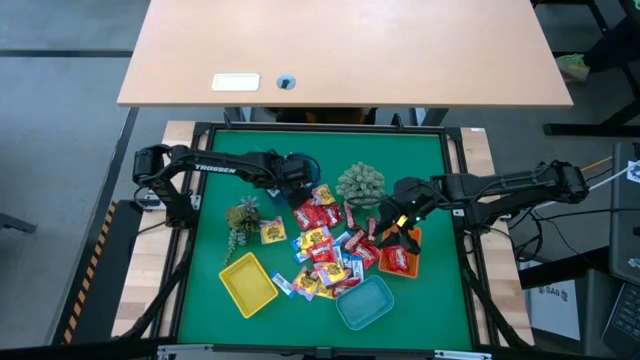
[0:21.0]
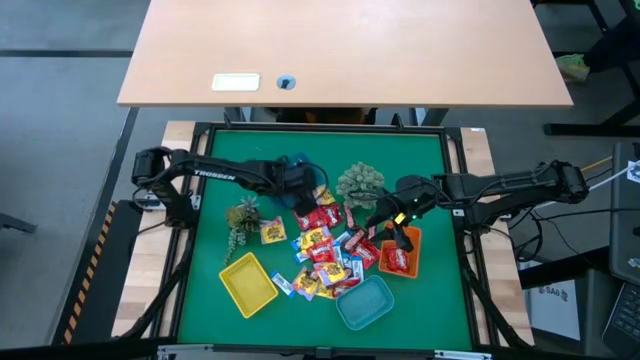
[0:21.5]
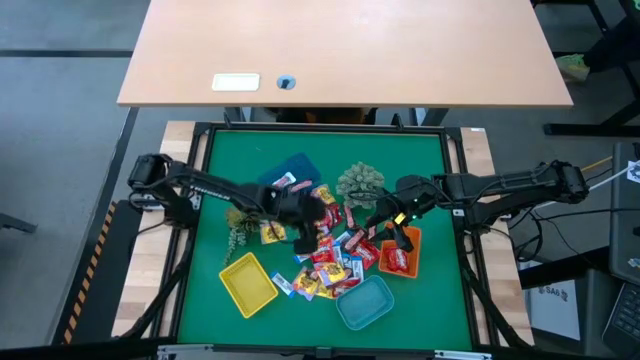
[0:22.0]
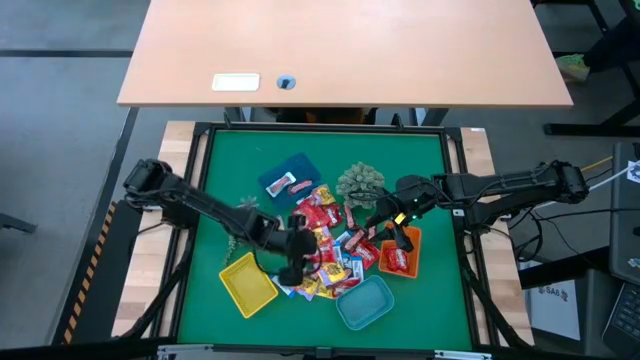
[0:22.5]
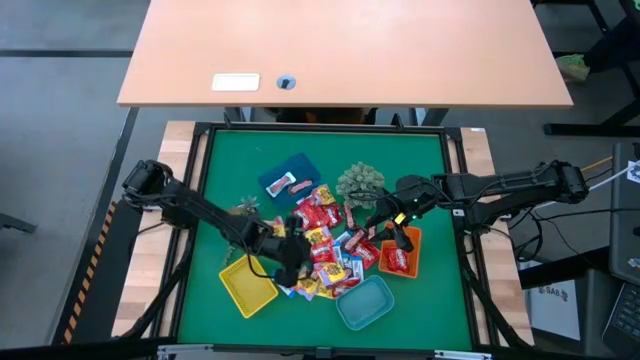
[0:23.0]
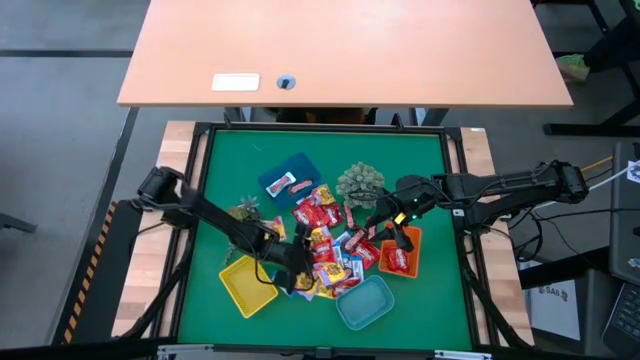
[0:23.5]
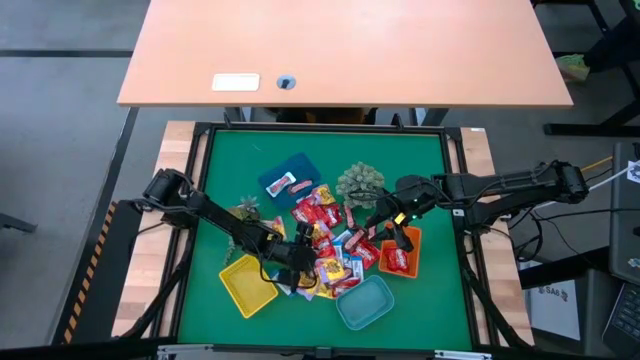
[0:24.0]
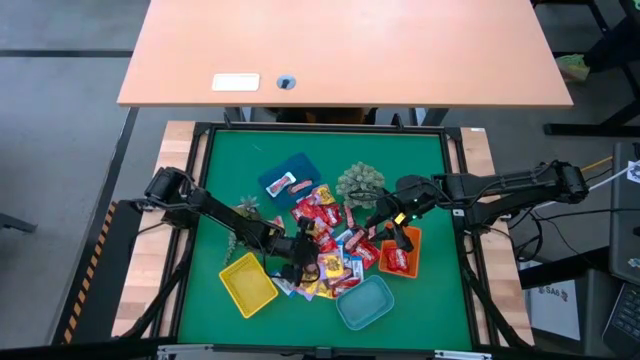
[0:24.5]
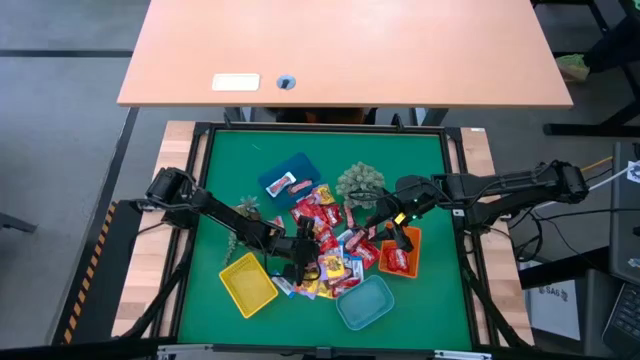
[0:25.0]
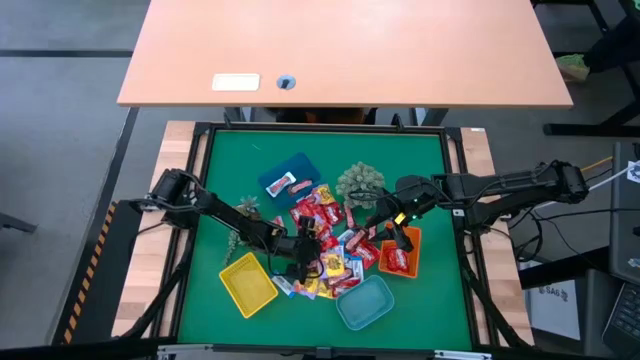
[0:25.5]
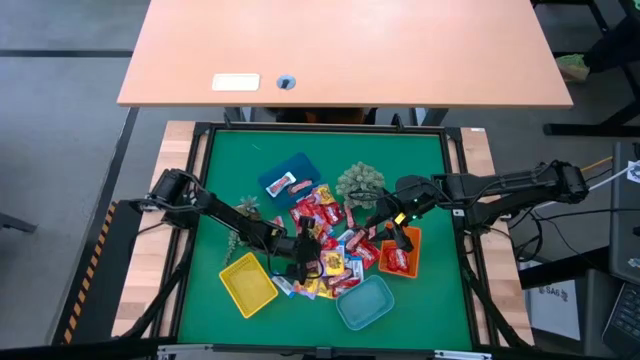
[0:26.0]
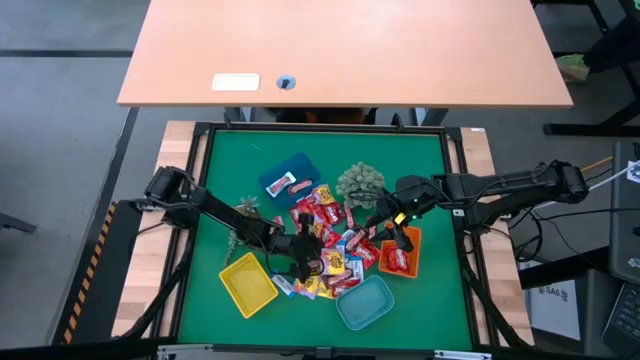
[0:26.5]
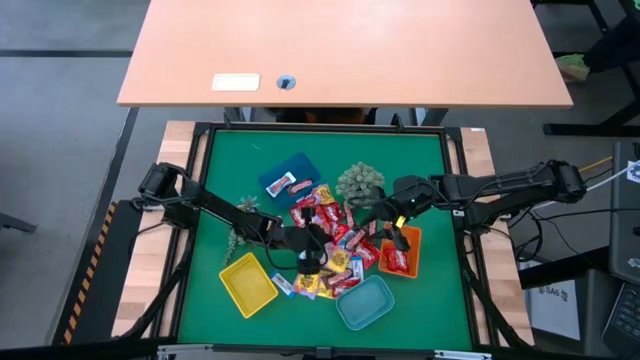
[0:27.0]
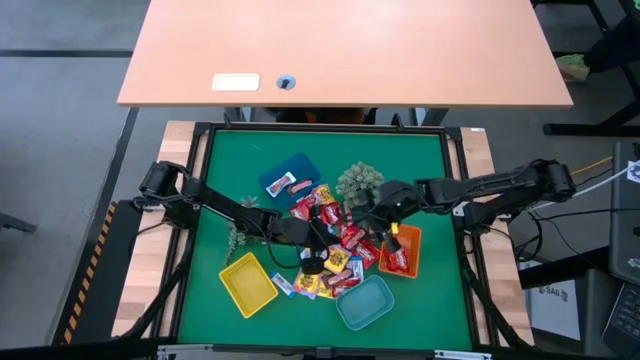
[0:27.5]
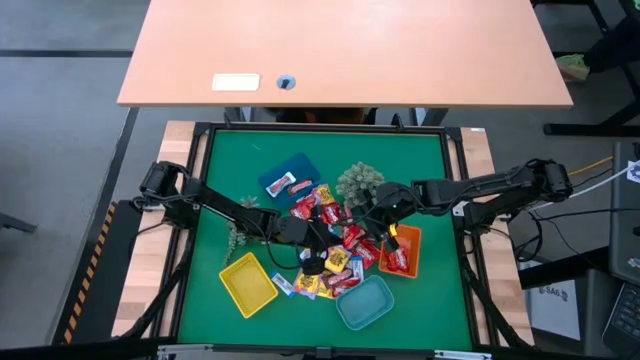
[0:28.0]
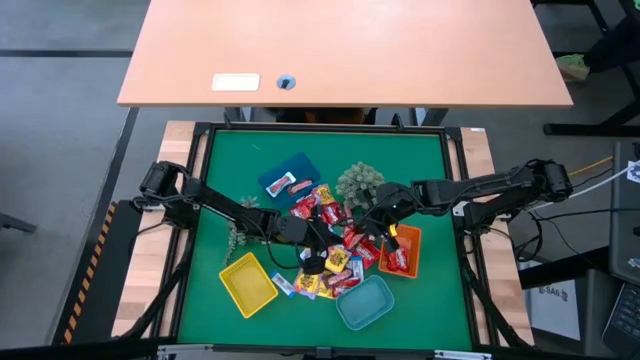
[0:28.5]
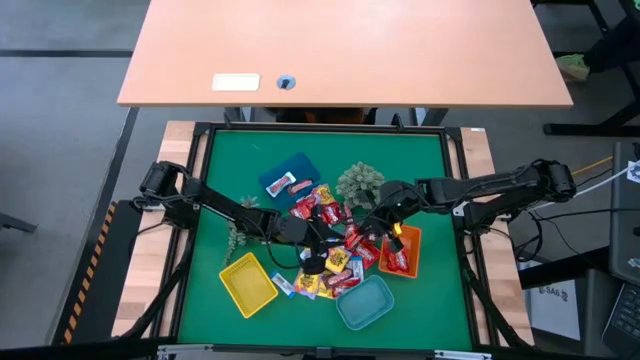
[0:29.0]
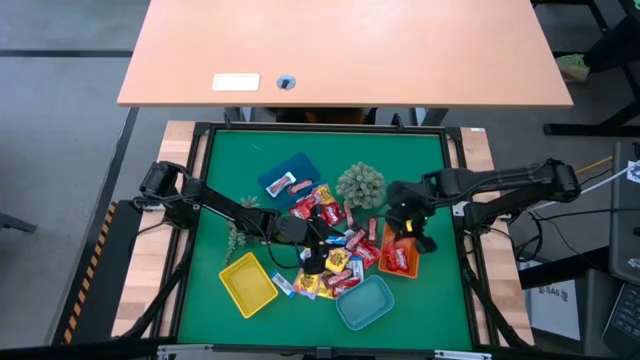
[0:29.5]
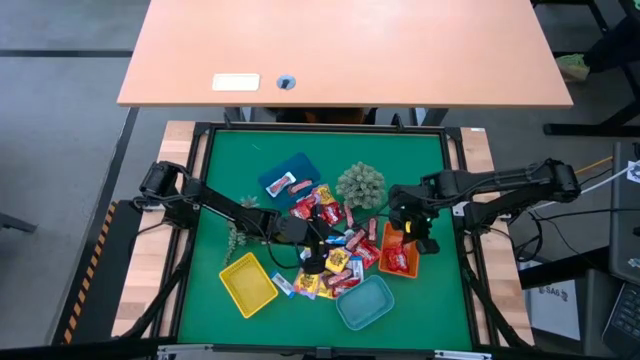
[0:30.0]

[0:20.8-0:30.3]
Task: Sort candy
Put the red candy into the orange bin

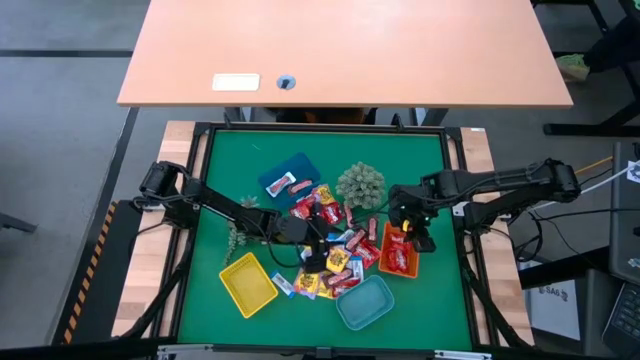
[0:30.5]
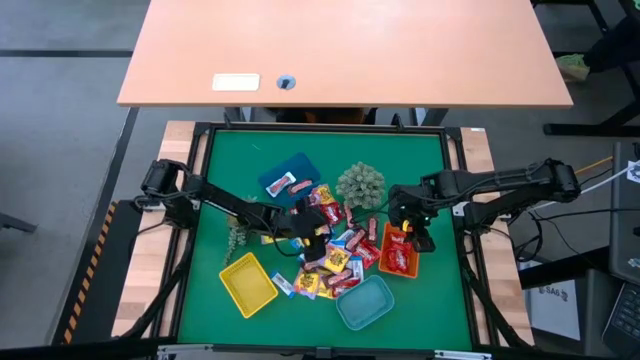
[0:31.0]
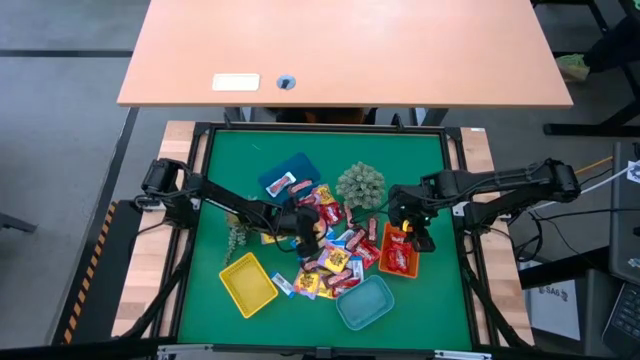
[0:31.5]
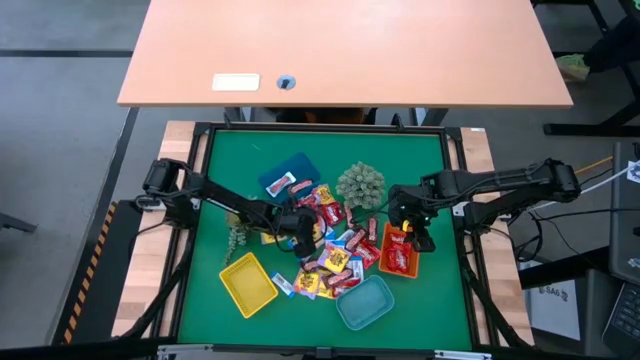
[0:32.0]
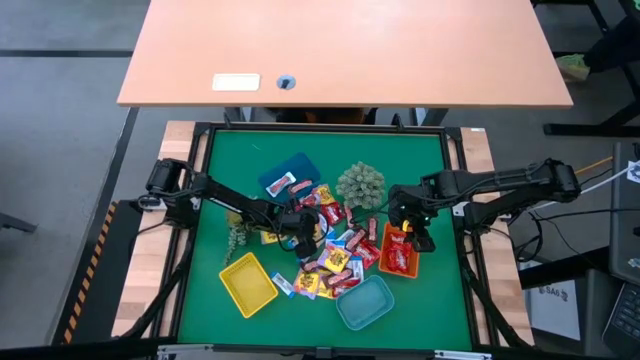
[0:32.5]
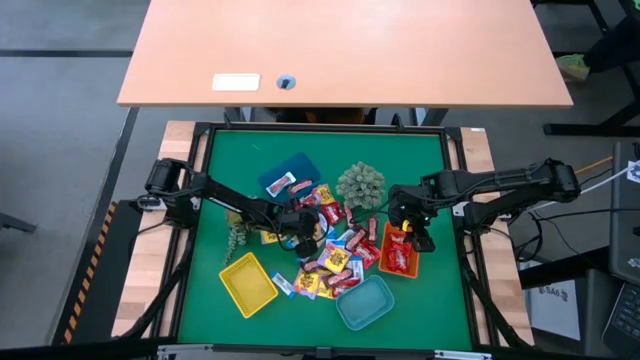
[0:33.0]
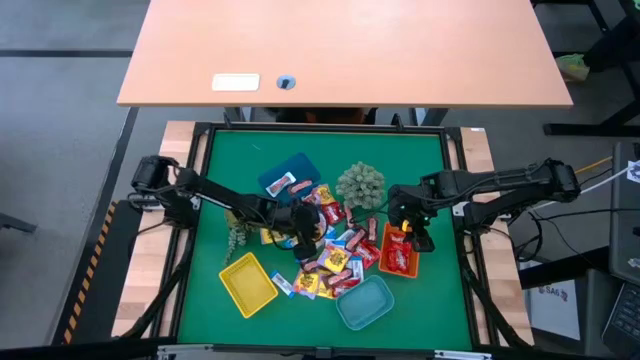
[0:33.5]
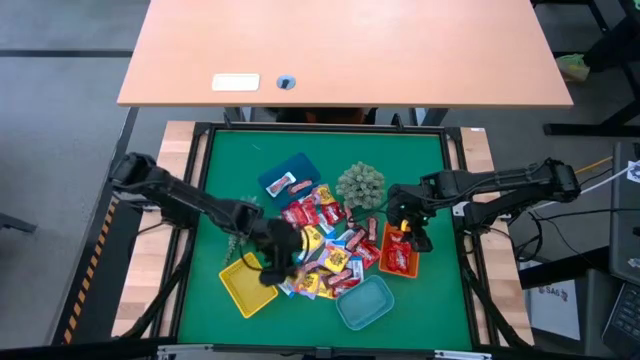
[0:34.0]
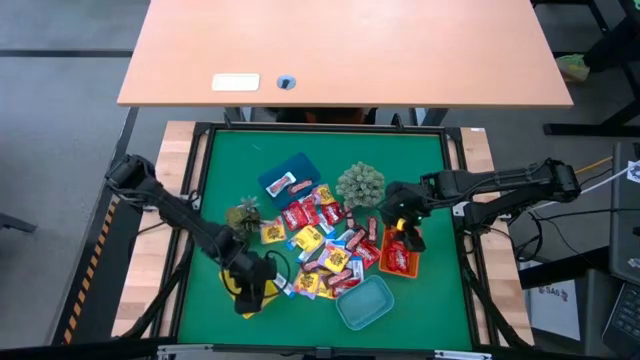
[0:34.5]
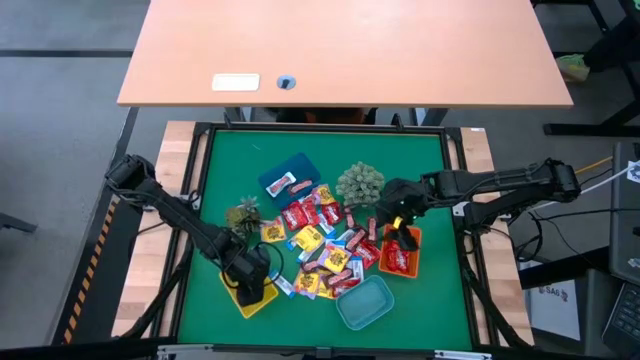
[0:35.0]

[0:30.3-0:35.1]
Put the yellow candy into the yellow bin

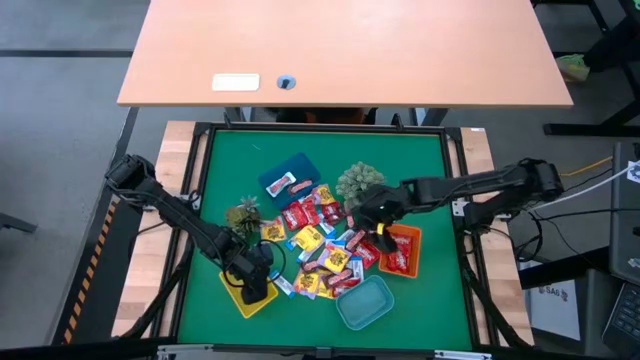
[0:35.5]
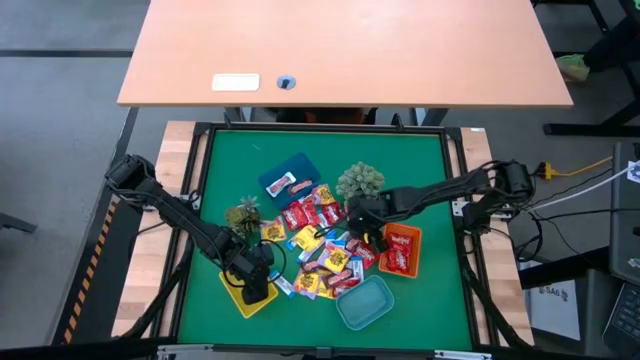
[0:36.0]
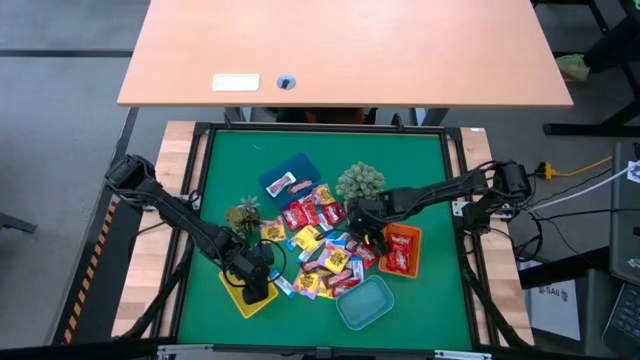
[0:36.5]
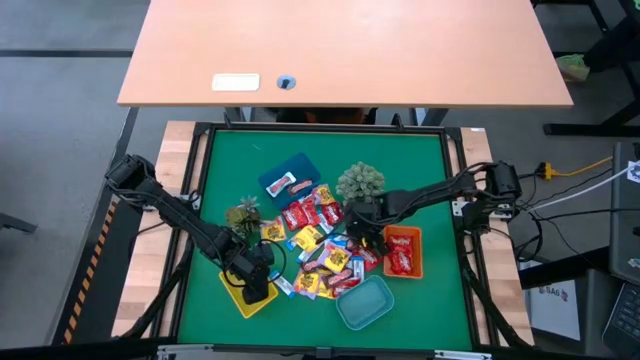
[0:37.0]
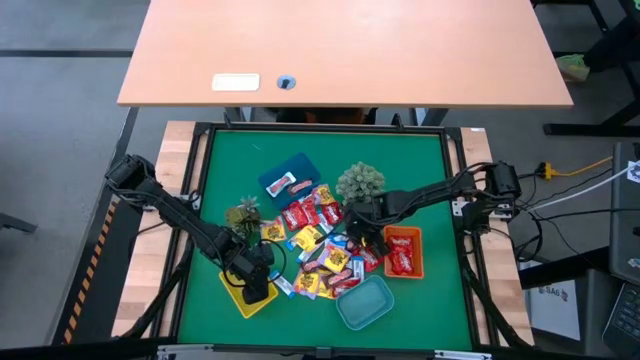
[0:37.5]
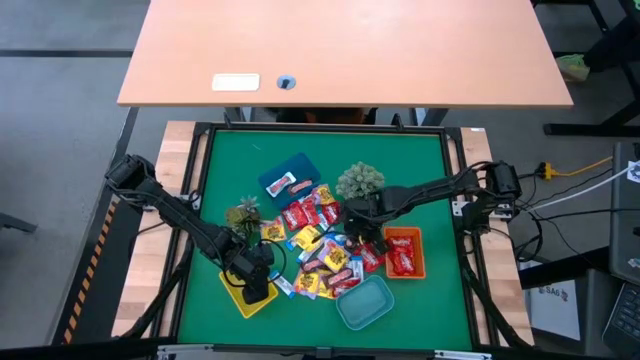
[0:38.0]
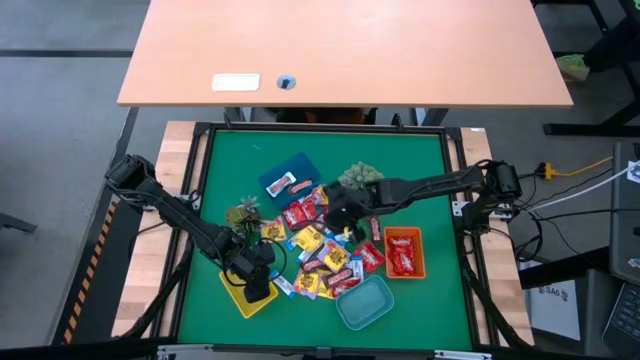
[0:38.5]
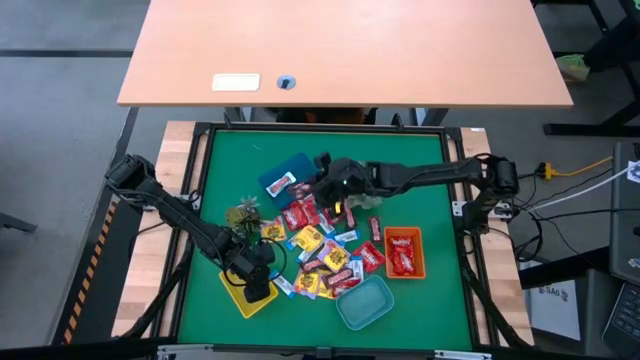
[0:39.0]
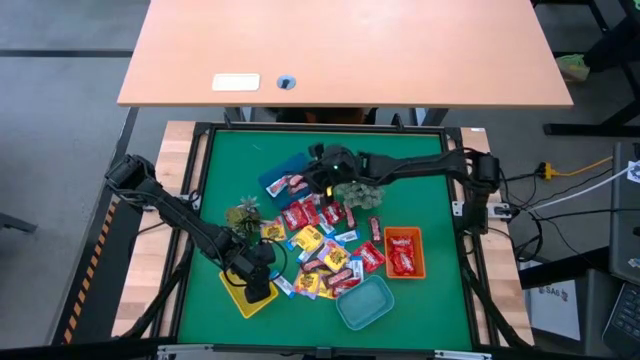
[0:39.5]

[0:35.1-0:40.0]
Put the brown chocolate into the blue bin

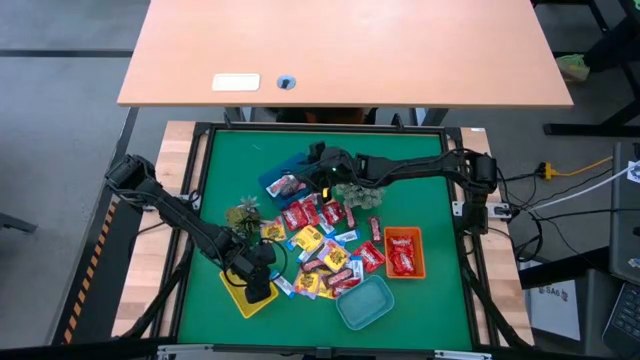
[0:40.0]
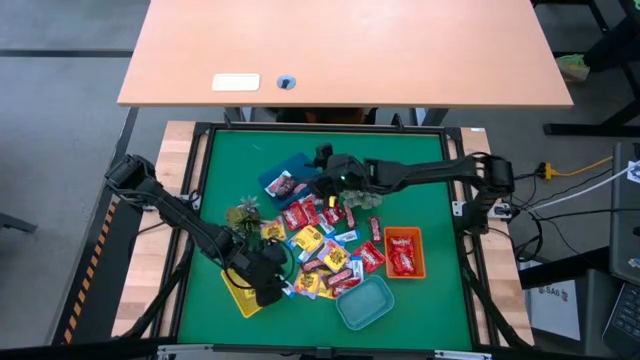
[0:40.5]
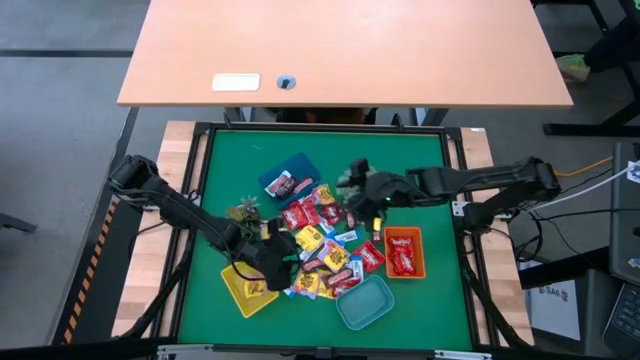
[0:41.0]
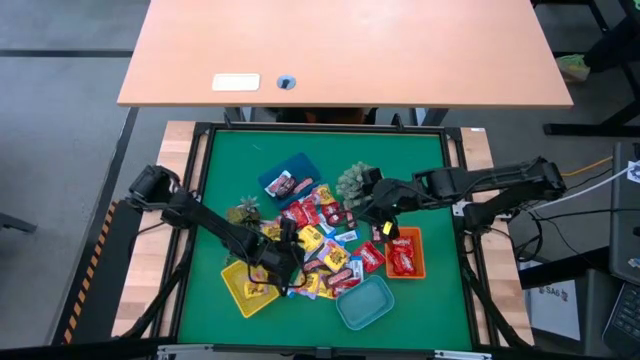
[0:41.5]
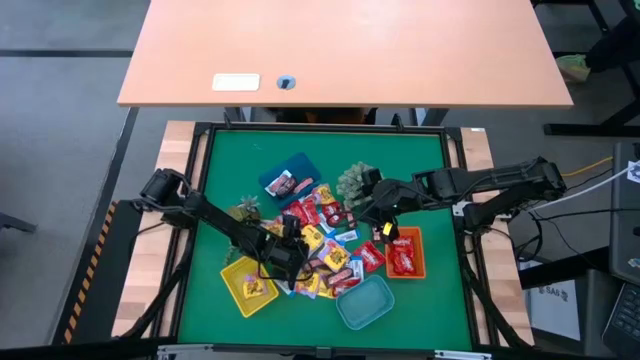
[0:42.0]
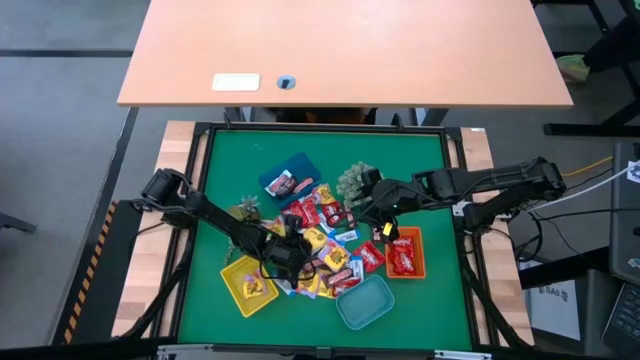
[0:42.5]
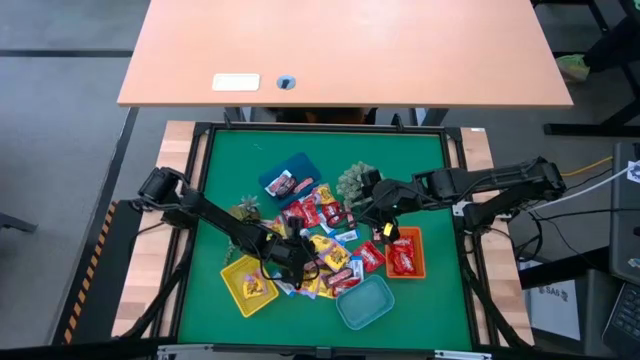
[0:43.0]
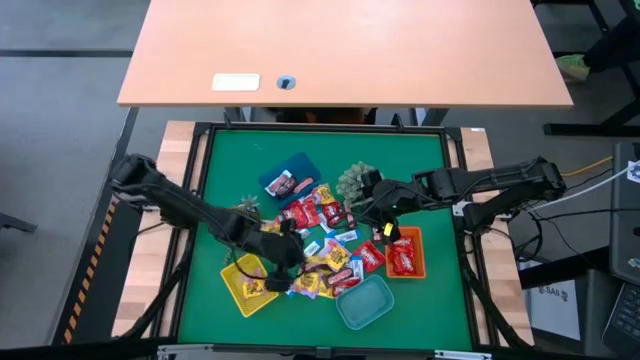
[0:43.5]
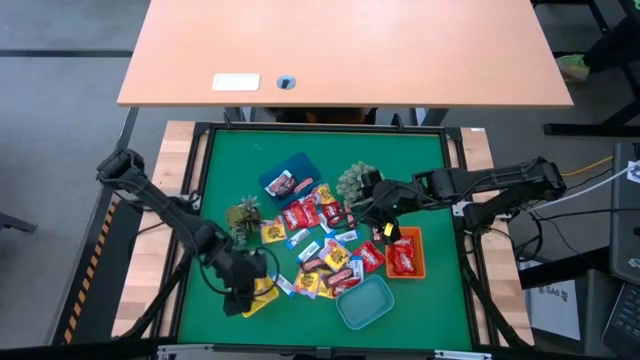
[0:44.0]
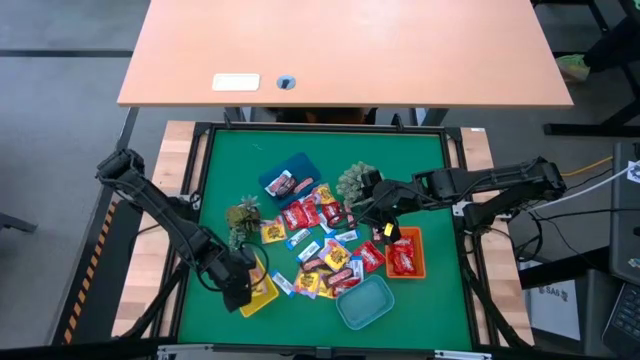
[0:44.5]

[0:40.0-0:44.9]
Put the yellow candy into the yellow bin
